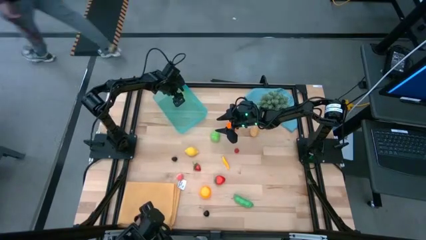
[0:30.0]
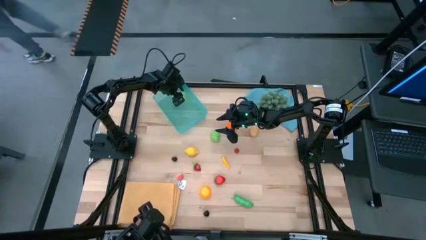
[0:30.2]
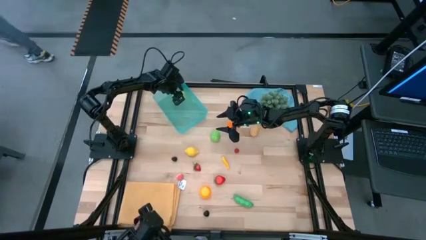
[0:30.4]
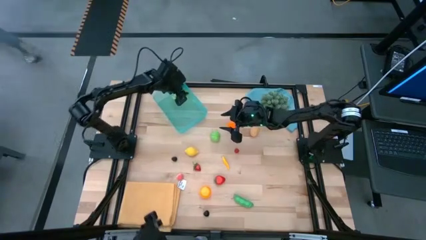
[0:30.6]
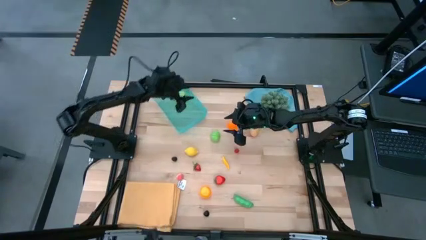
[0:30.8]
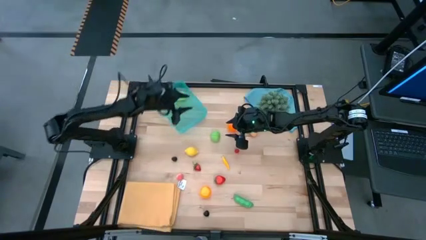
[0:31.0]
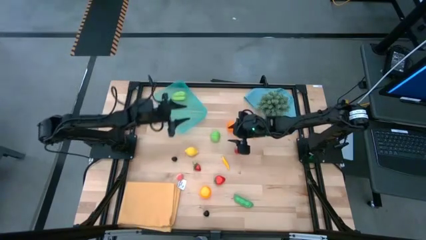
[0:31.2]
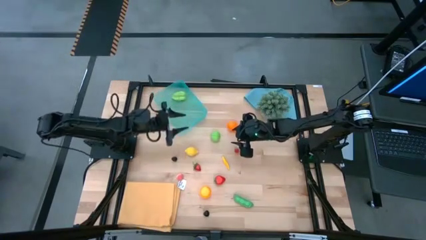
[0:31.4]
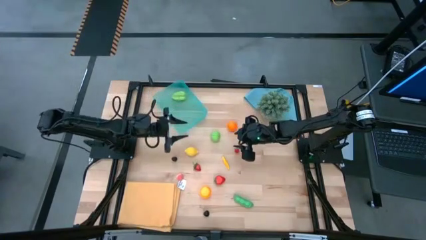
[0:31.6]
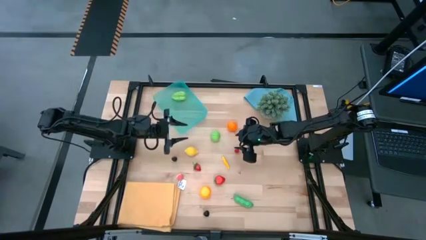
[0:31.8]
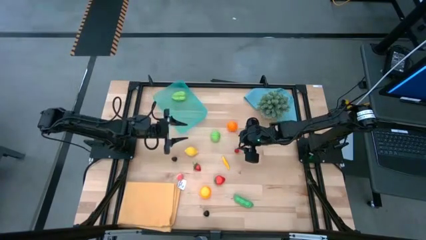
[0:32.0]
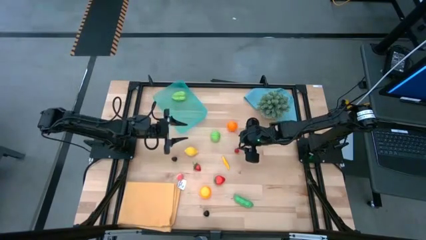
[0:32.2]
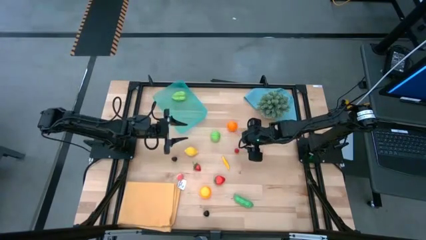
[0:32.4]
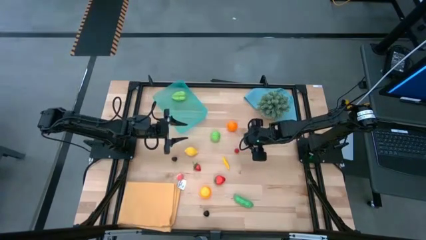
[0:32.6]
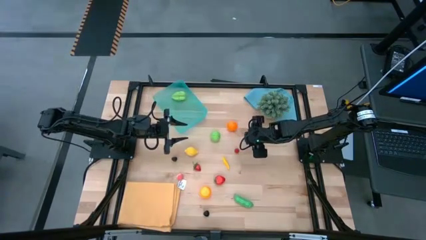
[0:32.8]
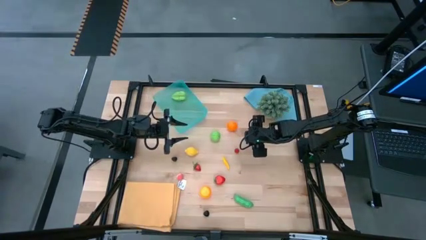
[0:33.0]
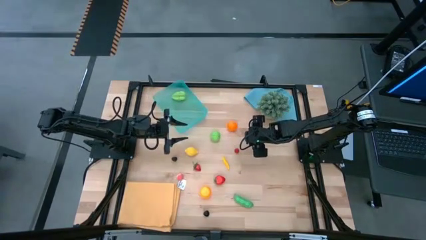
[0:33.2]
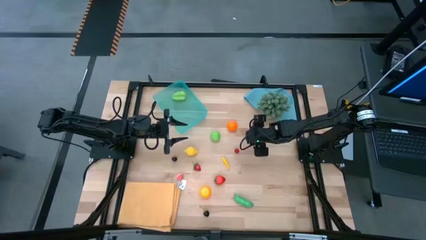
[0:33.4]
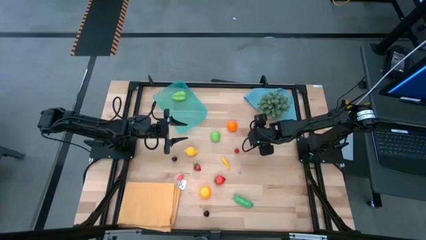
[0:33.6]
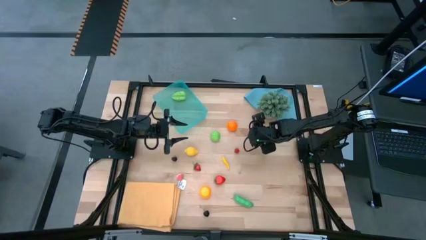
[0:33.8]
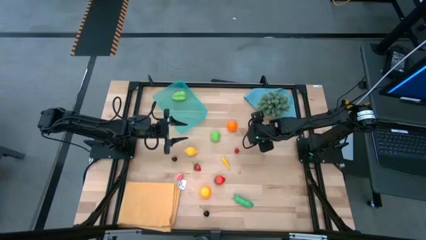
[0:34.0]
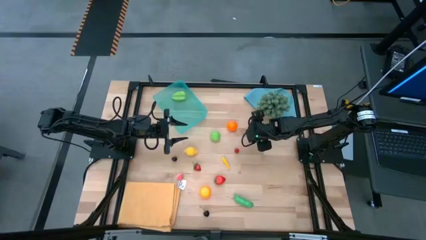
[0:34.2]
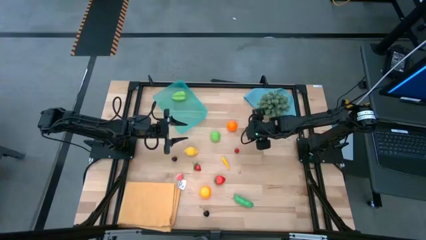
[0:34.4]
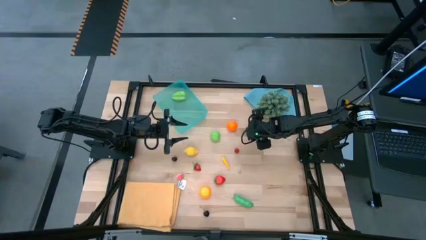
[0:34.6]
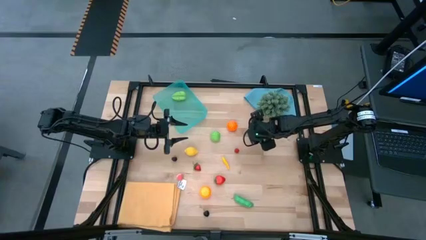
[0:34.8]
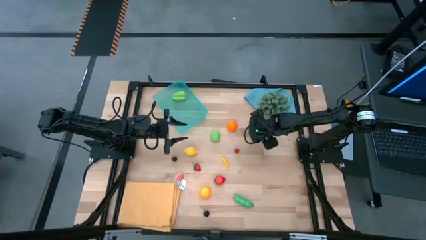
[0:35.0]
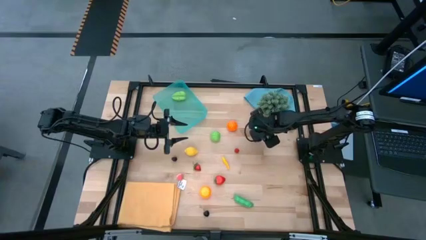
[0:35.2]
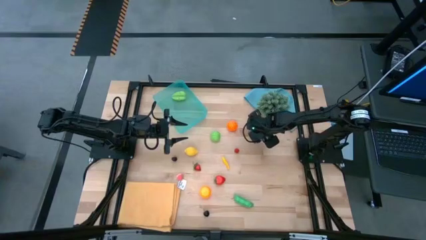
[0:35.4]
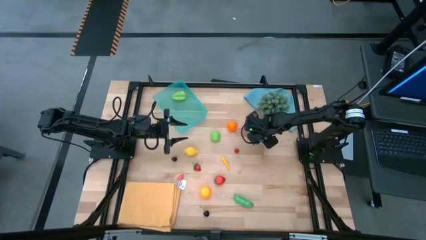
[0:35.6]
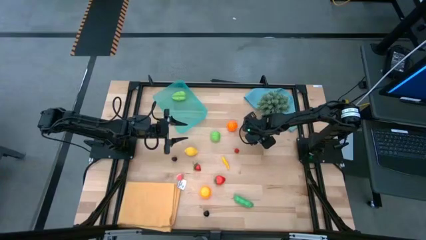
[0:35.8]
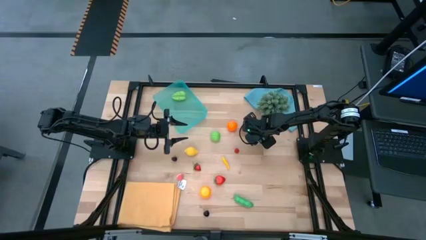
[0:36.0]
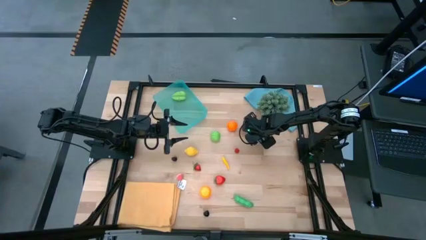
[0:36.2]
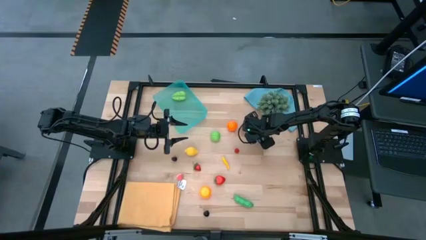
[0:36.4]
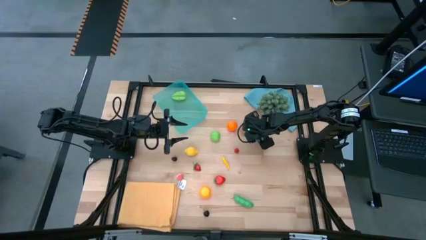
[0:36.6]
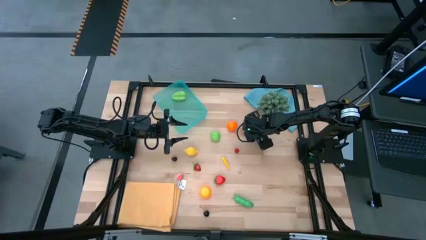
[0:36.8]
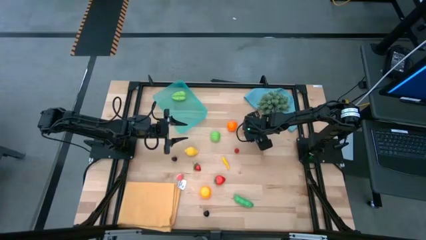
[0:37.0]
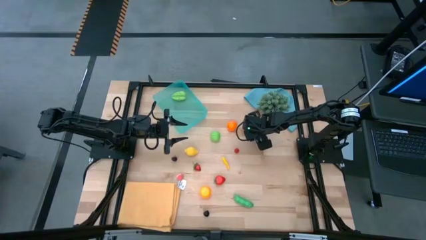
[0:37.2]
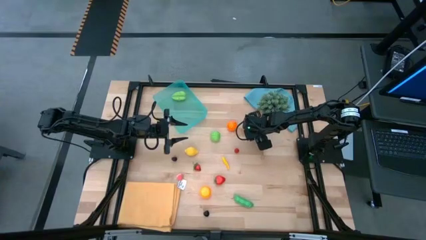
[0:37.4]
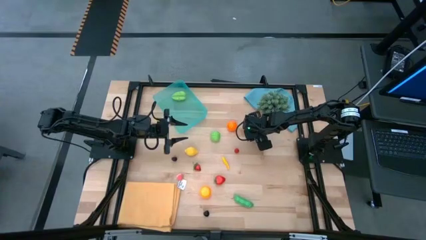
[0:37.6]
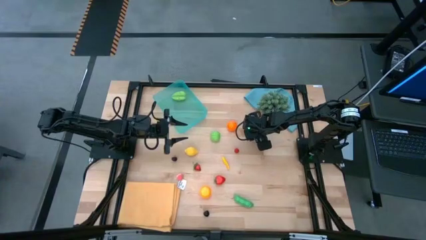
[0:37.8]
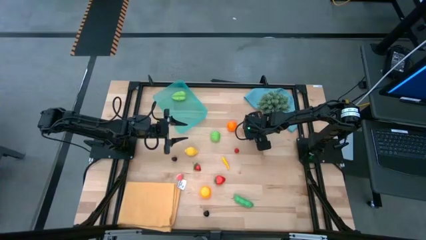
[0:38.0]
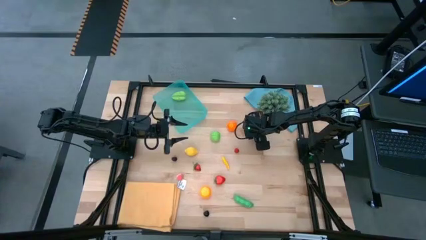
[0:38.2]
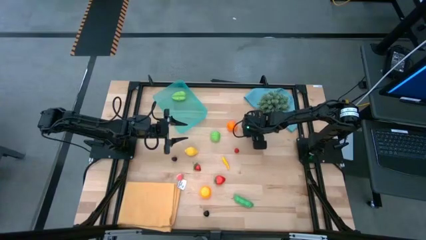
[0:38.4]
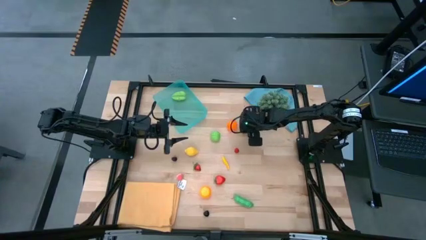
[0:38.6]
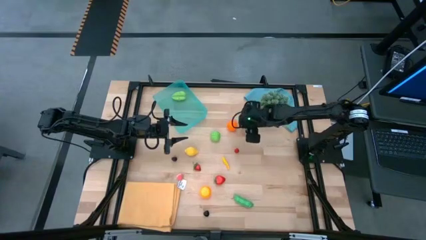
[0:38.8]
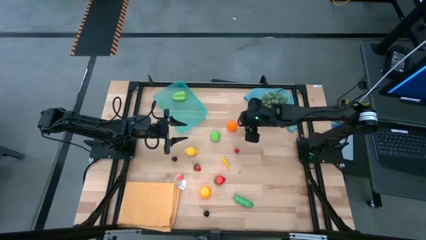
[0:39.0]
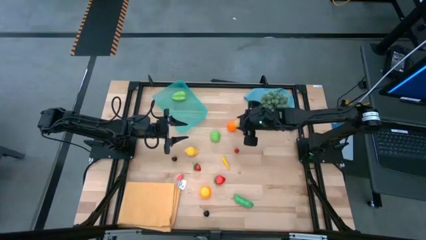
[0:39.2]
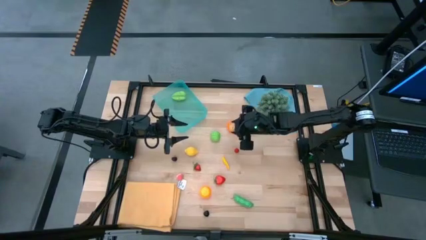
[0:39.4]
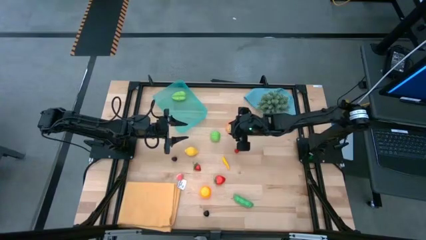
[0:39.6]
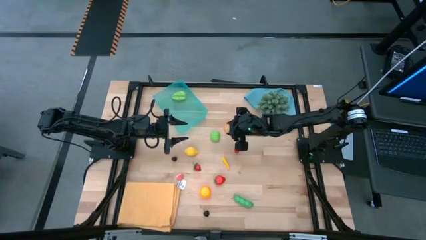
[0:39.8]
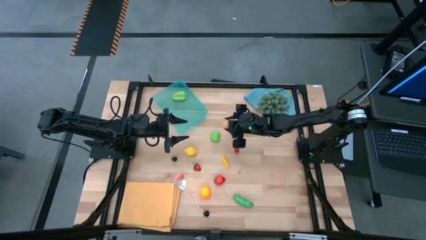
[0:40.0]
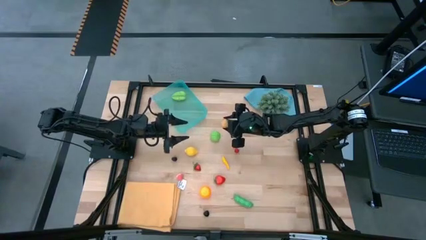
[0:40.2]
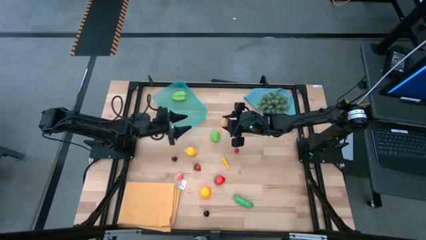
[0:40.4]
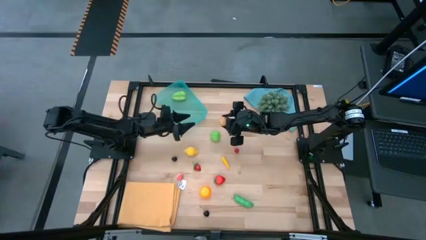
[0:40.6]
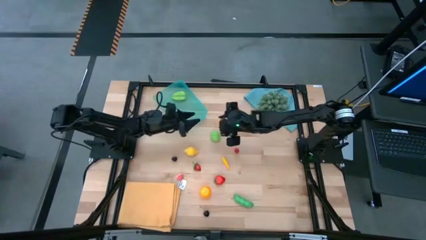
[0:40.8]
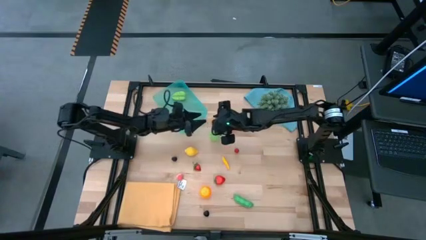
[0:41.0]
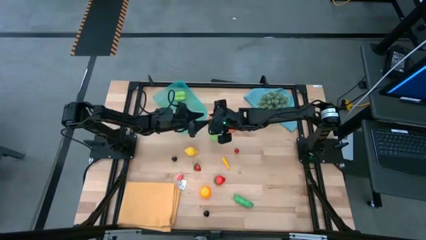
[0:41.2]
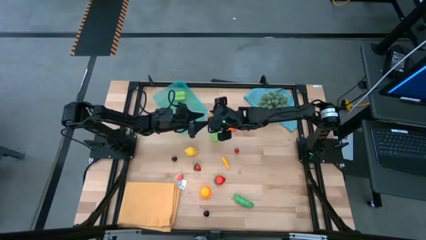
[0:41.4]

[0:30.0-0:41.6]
Task: Pick and placing Produce into tupperware
Put the brown potato into the blue bin

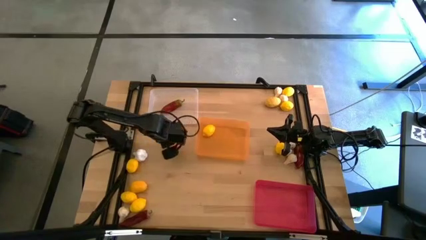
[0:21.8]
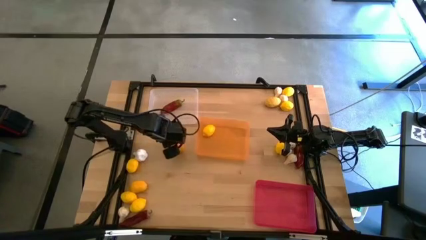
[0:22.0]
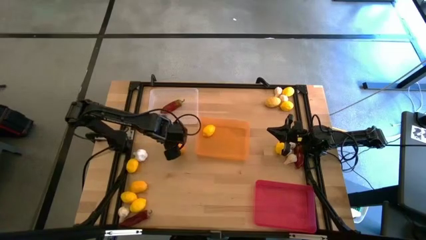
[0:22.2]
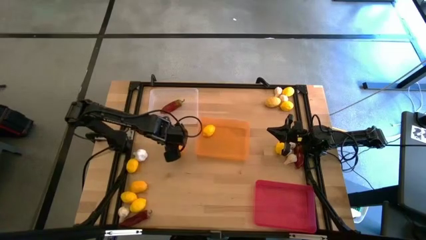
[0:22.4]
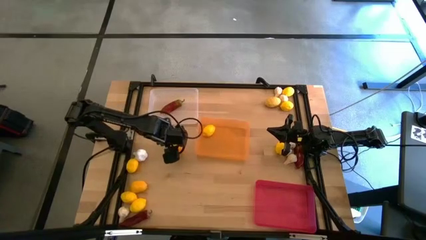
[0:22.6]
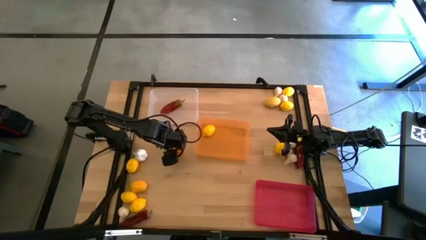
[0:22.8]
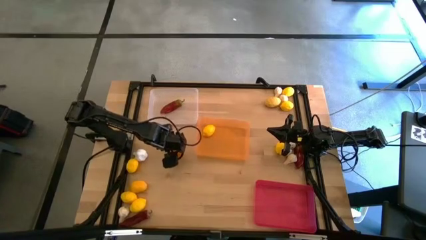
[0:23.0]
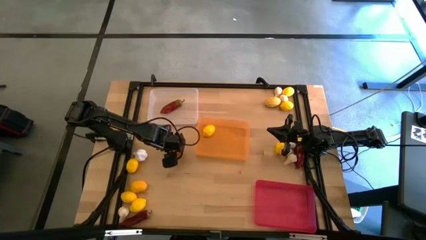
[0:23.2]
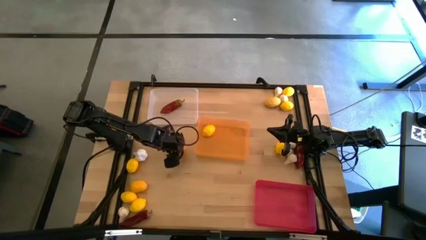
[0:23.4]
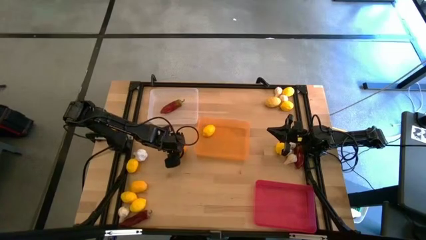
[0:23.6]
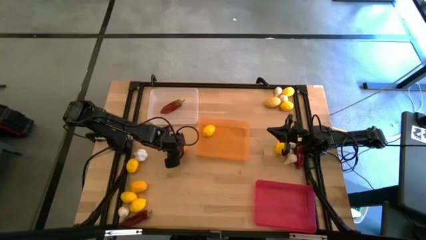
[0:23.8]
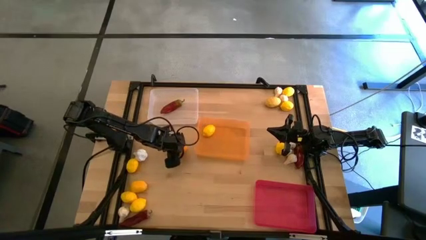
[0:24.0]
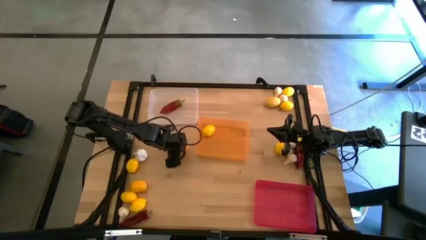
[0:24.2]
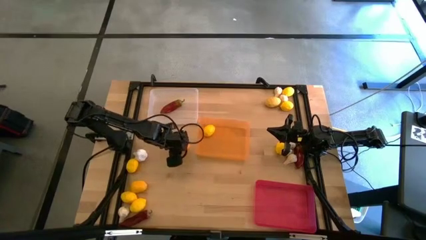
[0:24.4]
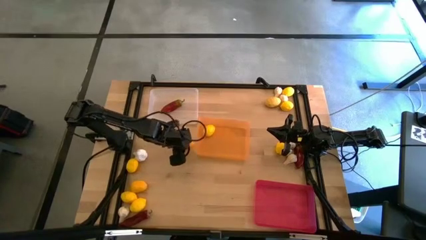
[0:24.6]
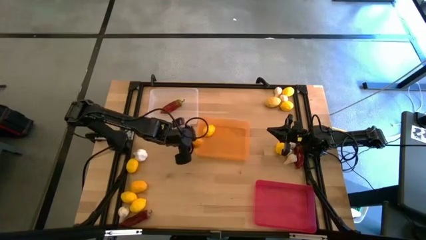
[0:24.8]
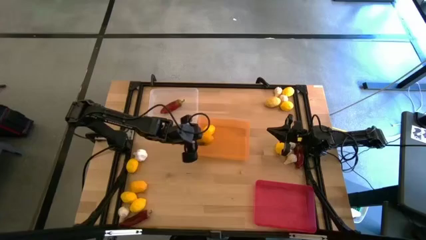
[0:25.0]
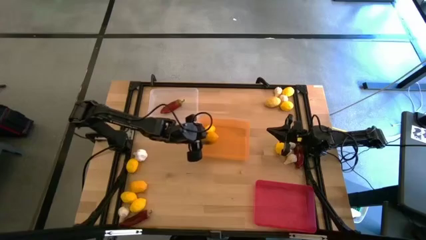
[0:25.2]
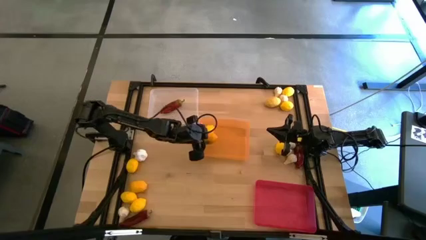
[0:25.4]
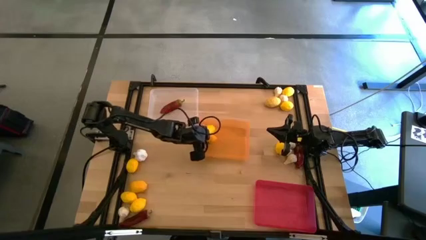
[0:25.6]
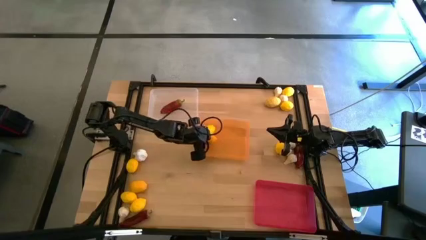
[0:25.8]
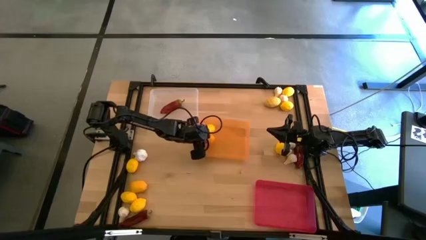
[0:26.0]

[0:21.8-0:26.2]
Task: Sort produce into baskets
Put the lemon into the orange bin
